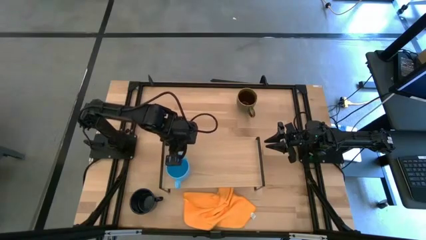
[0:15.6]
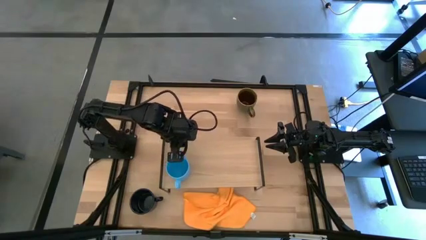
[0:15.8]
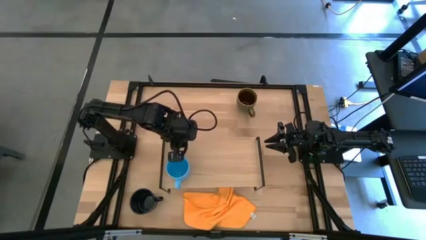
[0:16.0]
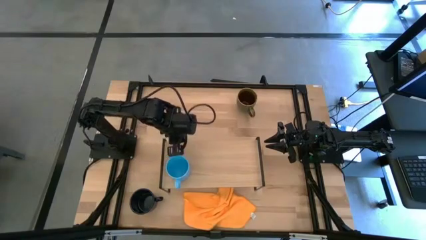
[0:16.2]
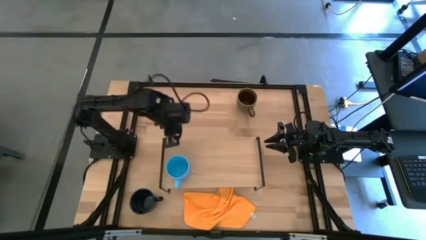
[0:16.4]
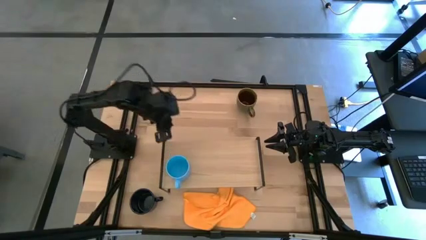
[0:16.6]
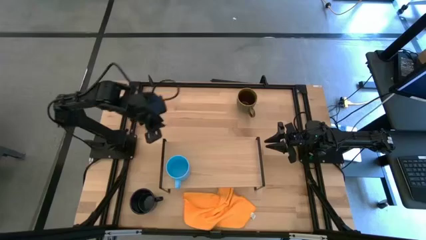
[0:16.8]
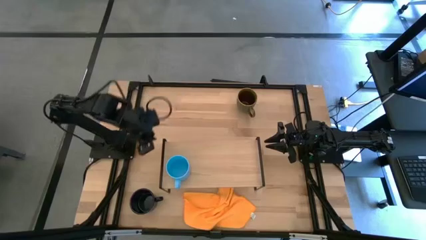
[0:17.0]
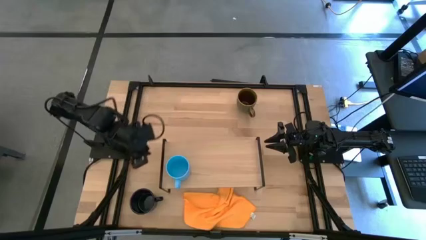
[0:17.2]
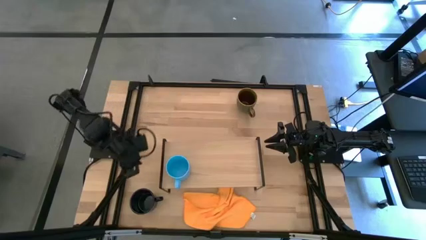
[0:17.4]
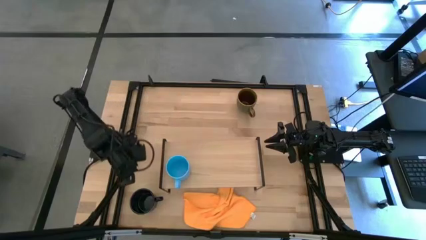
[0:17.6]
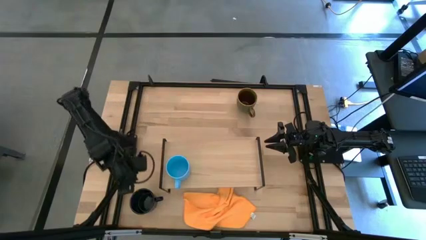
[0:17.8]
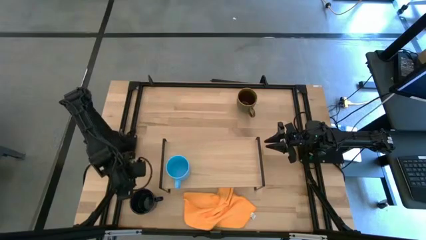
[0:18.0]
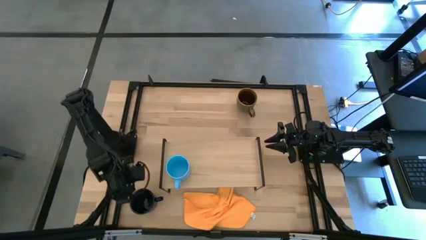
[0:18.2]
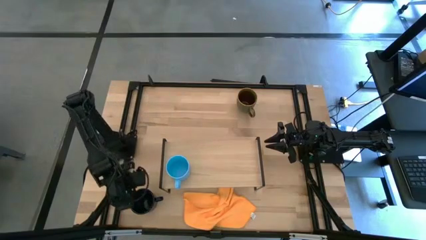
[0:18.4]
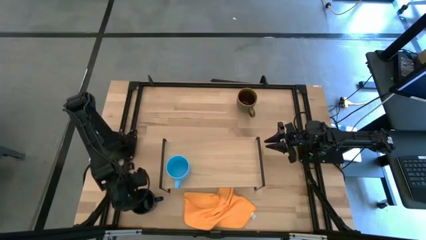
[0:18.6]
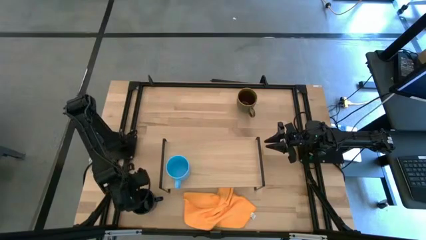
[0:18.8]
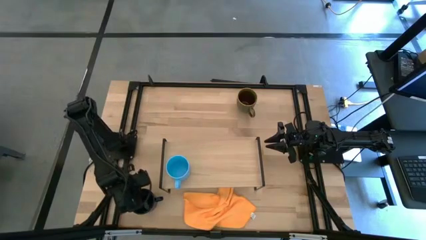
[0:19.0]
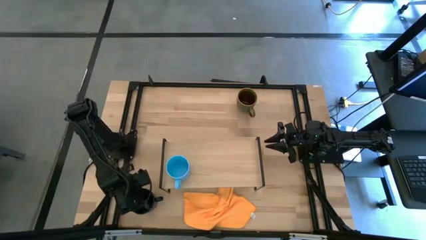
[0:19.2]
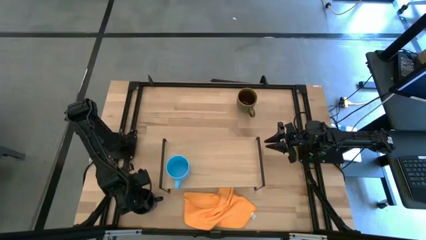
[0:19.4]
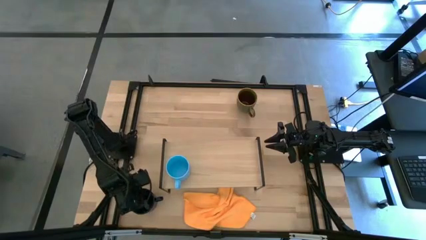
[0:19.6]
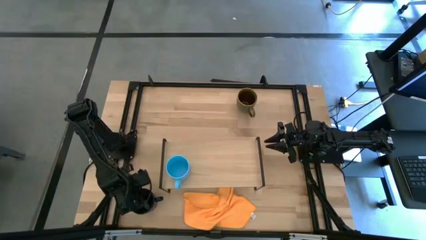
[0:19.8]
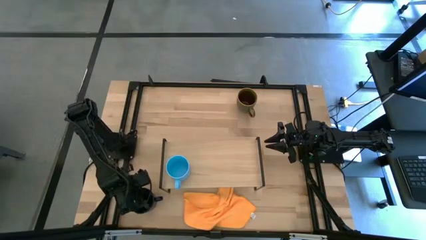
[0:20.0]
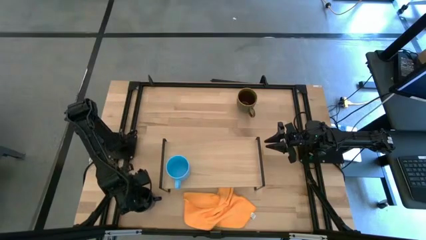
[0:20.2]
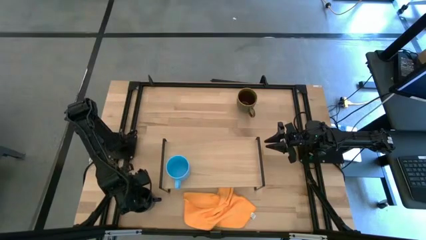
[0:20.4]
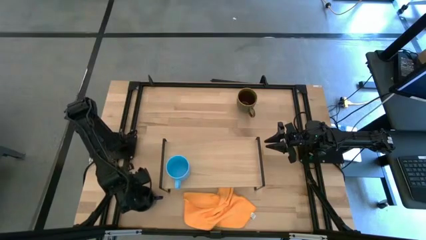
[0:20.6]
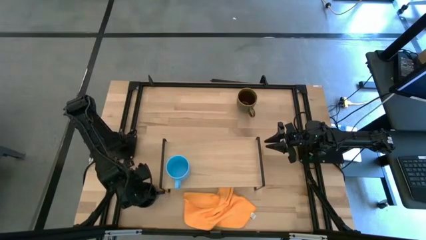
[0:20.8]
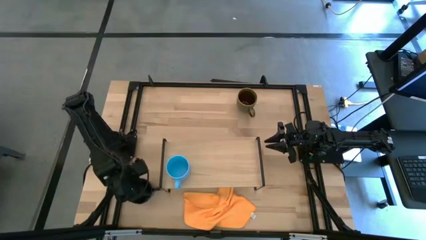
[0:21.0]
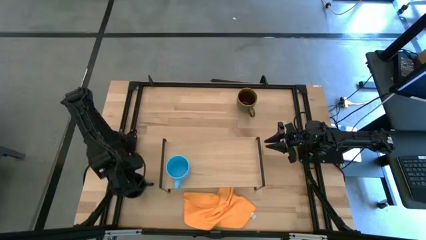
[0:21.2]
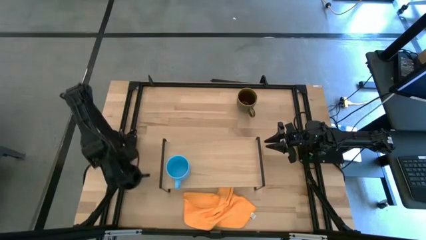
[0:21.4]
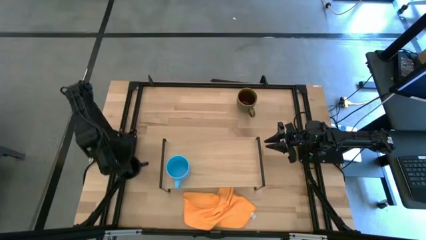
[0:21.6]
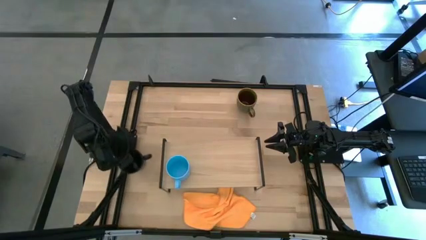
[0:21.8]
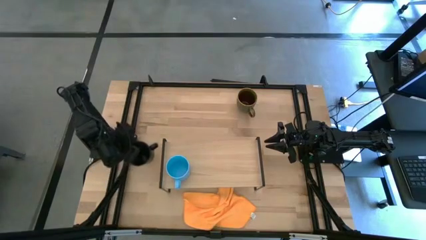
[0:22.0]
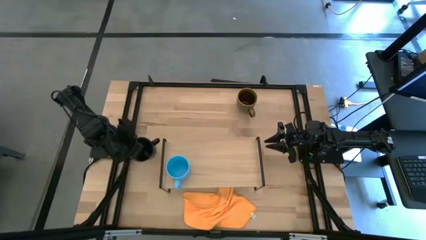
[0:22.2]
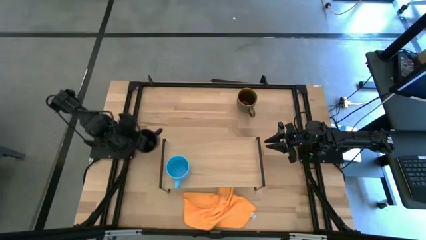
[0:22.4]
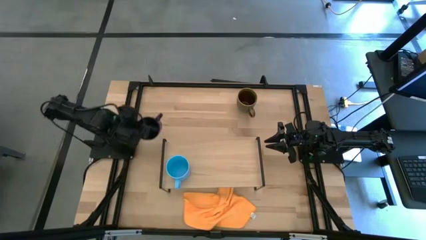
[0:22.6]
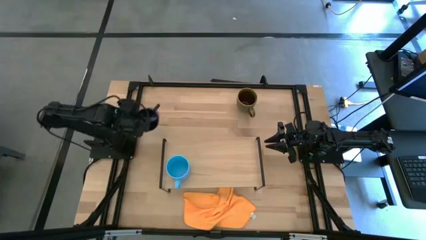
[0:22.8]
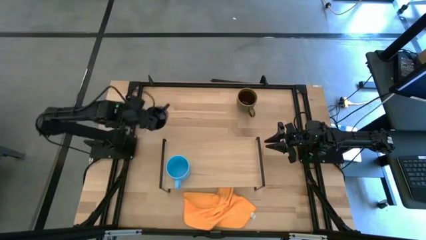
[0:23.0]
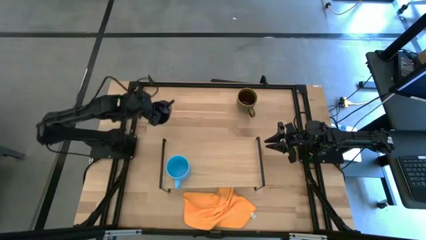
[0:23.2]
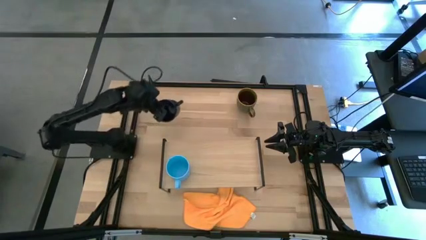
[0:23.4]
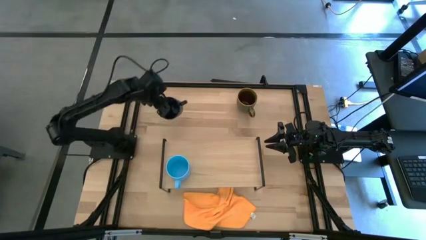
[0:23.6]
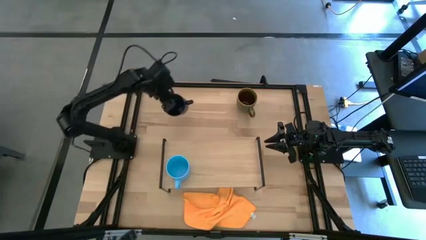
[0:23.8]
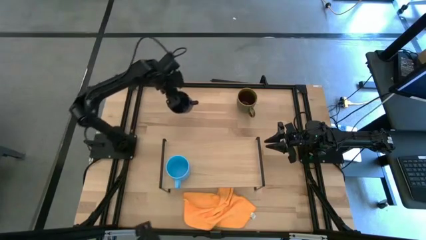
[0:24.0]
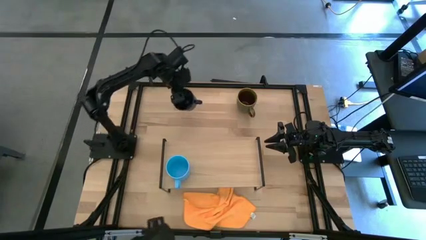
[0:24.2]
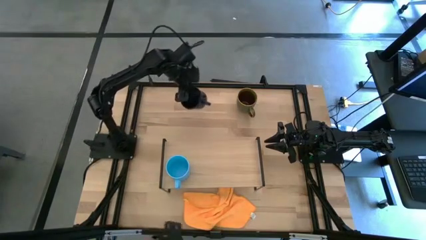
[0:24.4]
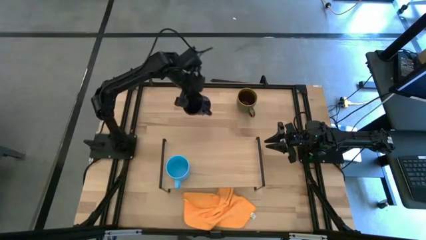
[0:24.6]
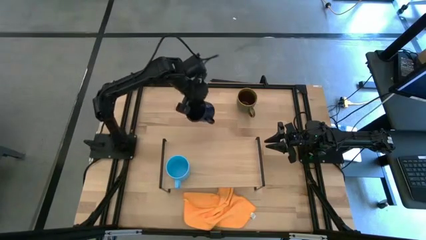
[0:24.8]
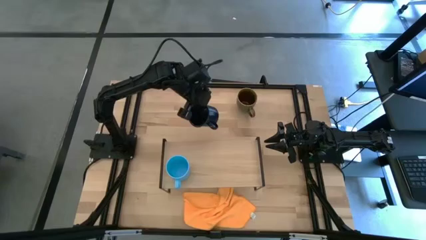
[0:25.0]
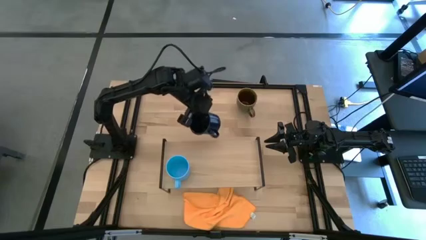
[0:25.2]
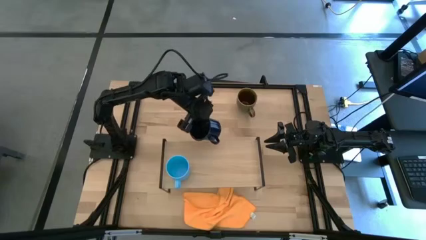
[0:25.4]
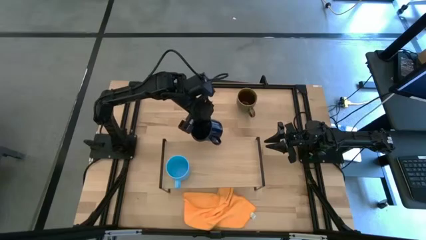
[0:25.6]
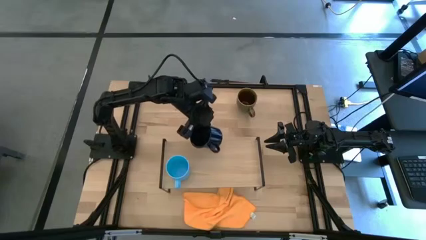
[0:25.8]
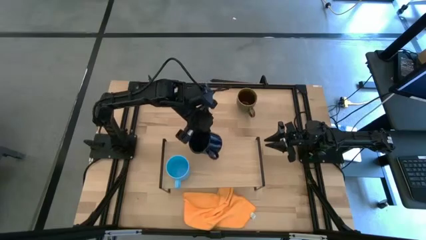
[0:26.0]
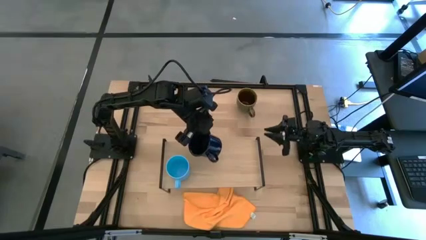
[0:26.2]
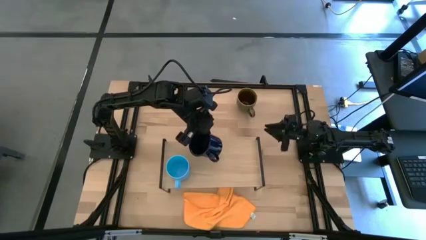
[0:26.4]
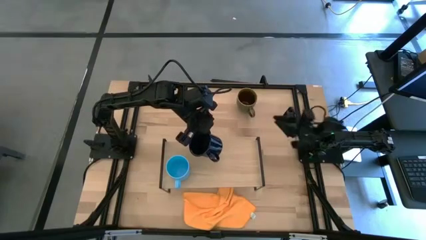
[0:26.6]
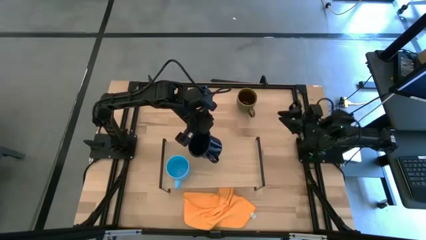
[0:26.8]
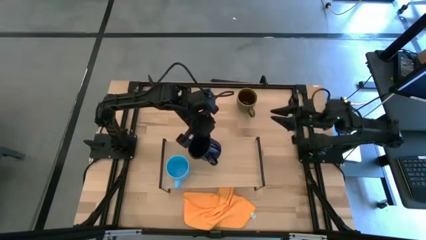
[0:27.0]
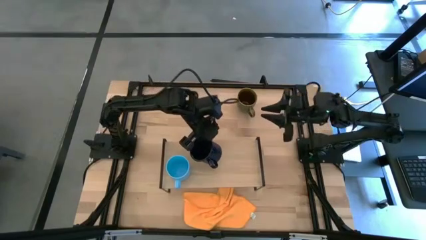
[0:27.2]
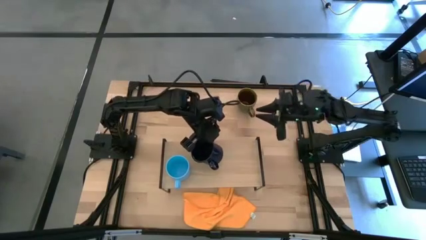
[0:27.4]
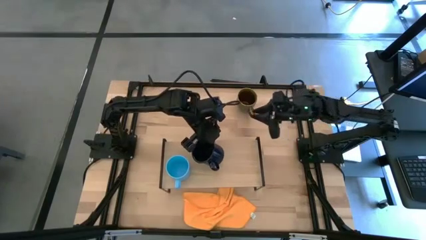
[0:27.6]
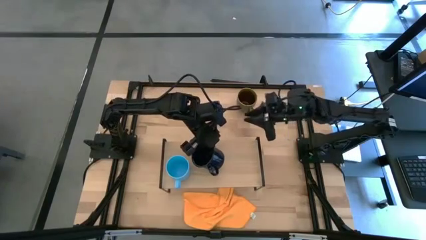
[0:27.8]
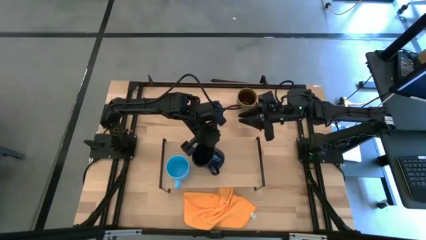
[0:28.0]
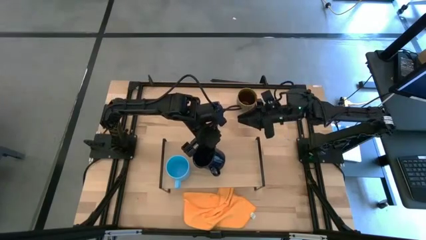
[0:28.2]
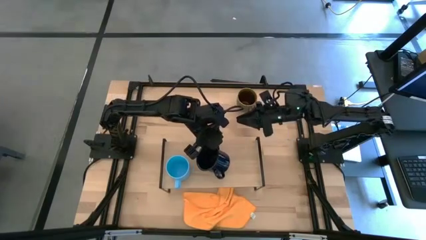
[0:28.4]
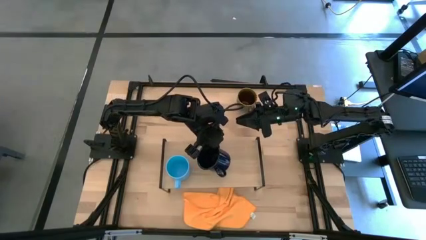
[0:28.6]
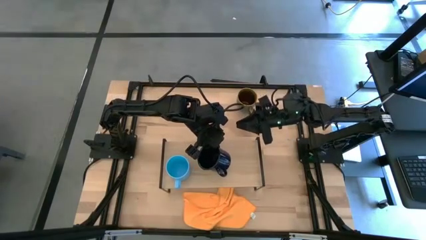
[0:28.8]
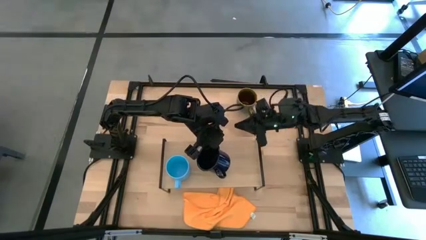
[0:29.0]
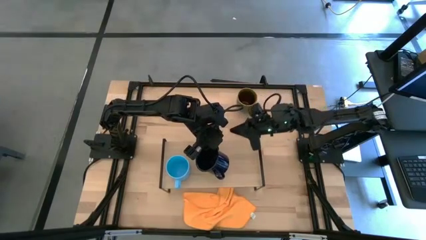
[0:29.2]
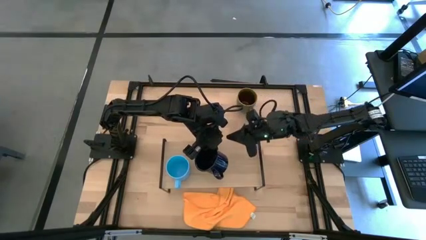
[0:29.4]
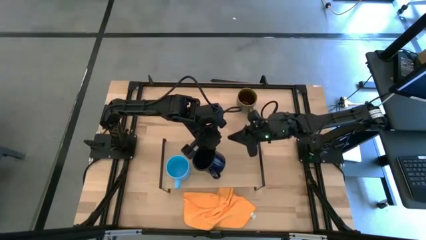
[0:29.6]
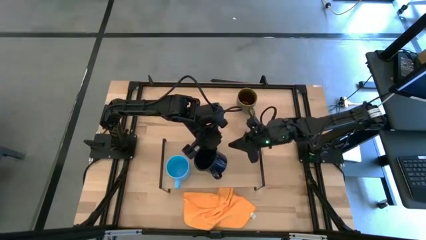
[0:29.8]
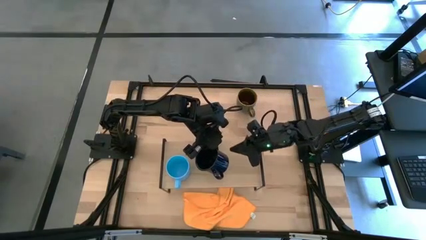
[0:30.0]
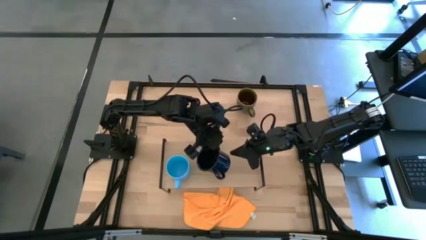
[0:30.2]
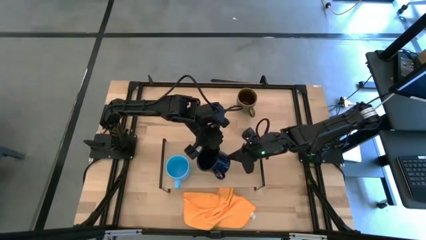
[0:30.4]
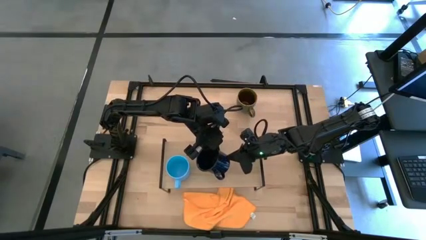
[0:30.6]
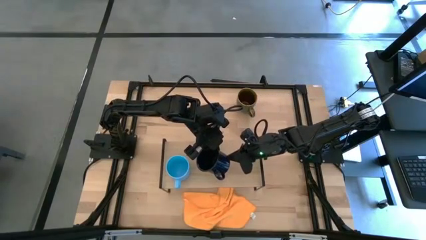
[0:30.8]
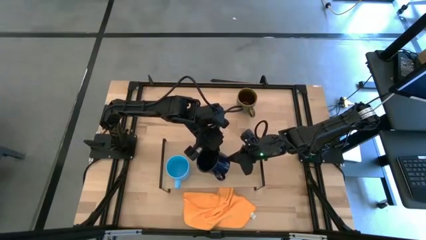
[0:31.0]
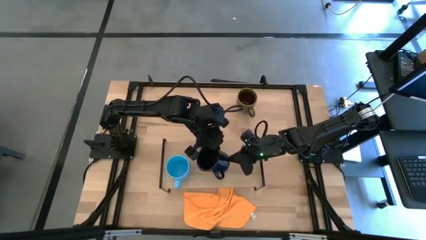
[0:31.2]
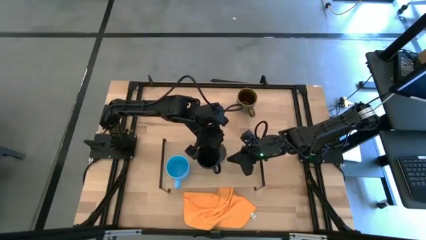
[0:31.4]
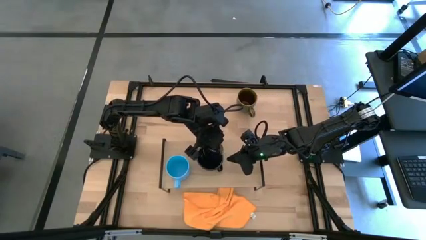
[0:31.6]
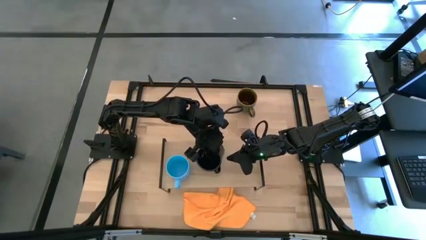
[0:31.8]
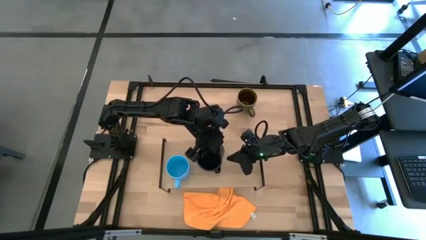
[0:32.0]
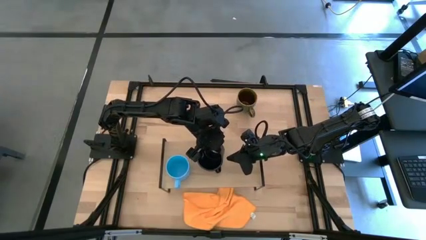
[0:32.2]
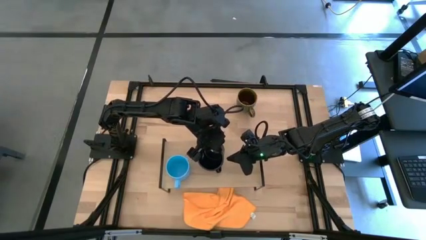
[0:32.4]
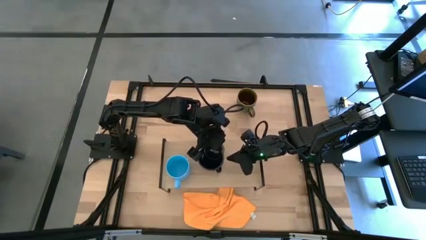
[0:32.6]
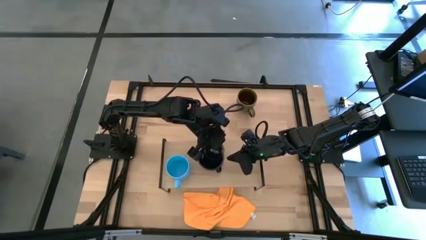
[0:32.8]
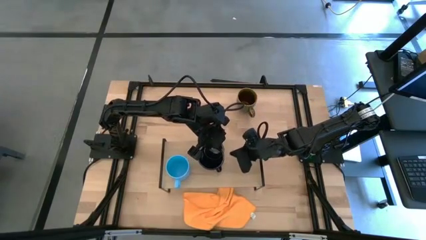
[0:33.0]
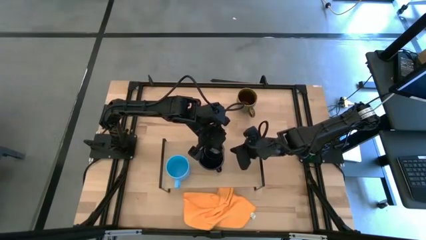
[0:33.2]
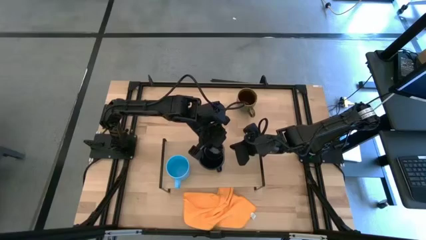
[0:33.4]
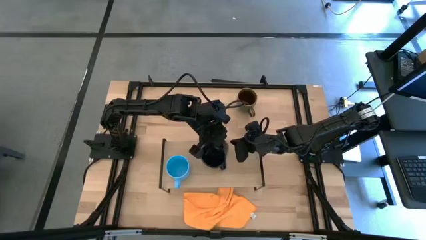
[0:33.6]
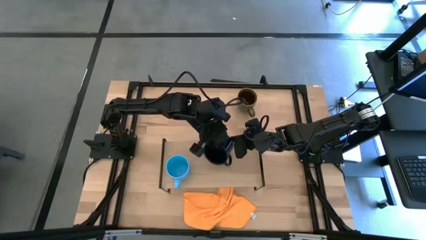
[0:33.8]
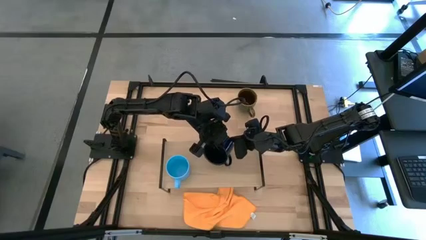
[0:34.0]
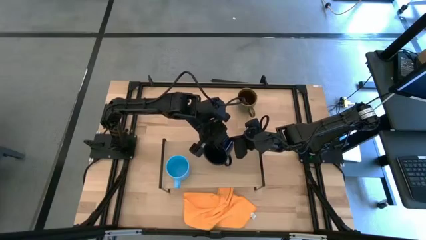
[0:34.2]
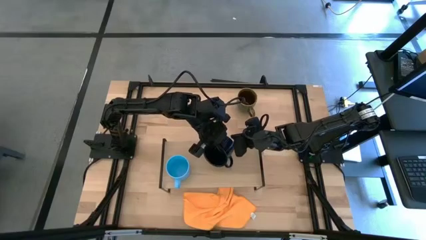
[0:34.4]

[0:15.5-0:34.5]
Task: Stack small to large cups/mugs on shelf
Put the dark blue mug on the shelf
